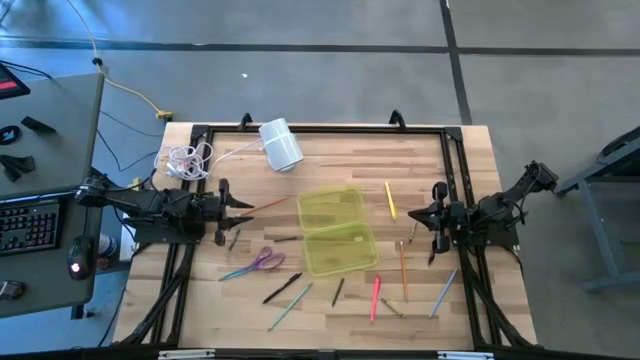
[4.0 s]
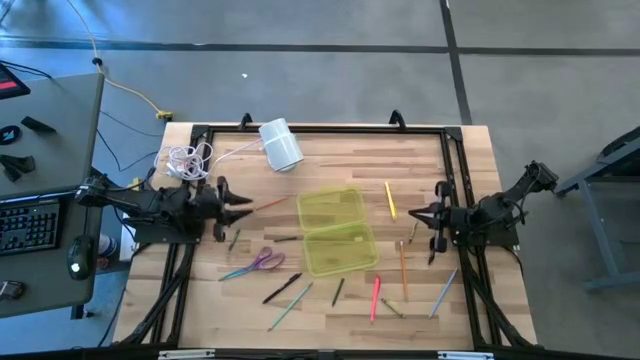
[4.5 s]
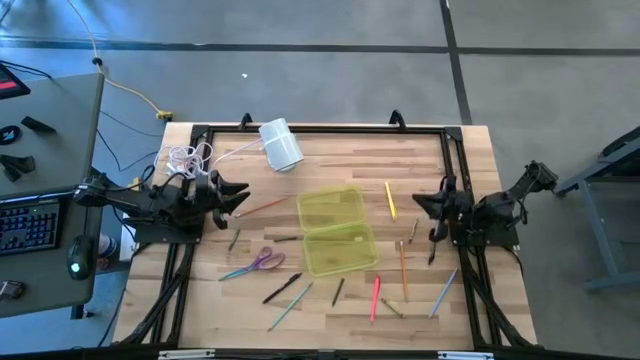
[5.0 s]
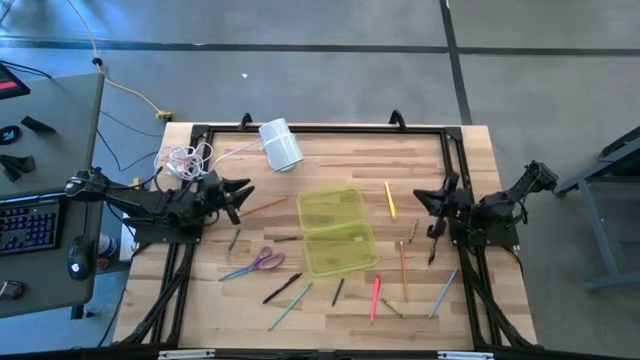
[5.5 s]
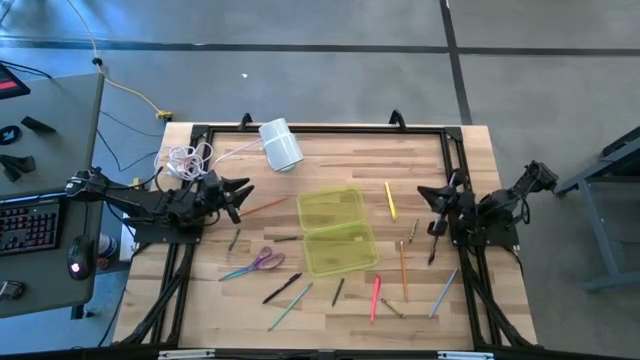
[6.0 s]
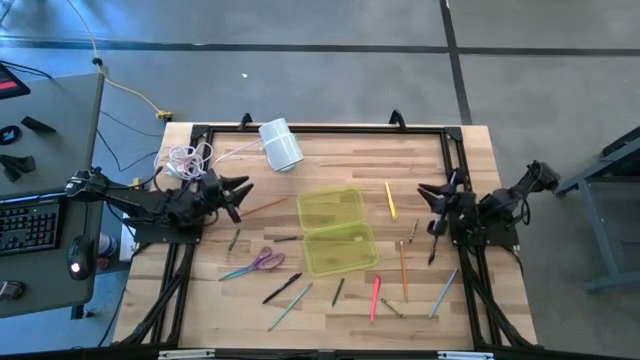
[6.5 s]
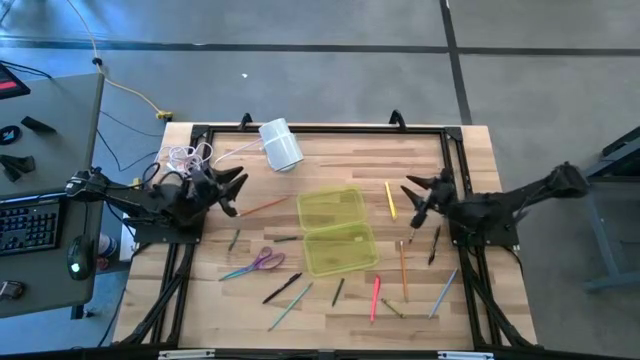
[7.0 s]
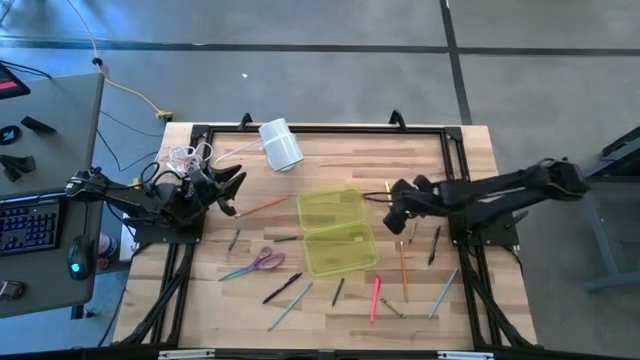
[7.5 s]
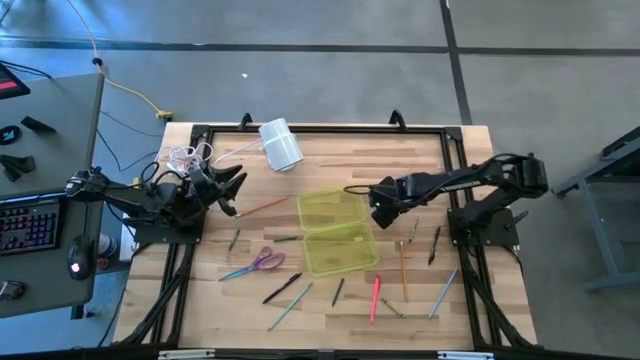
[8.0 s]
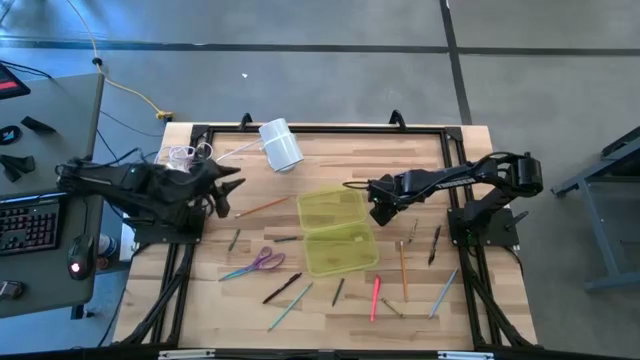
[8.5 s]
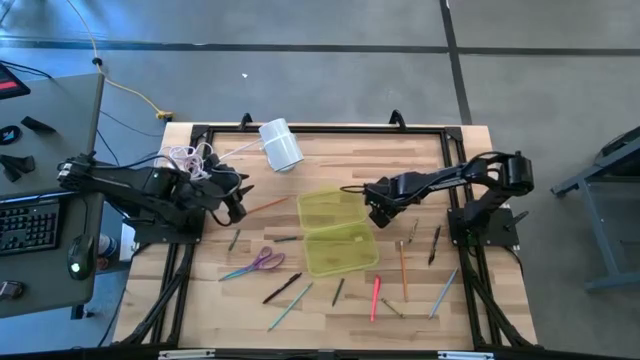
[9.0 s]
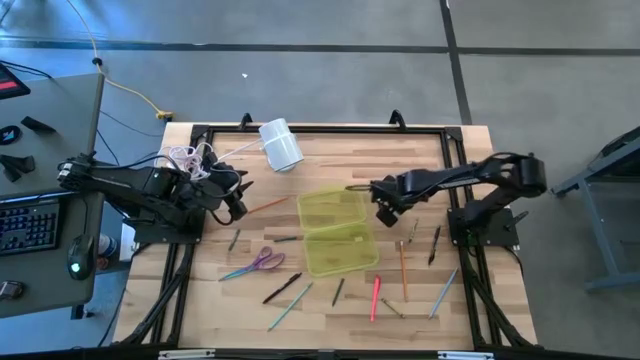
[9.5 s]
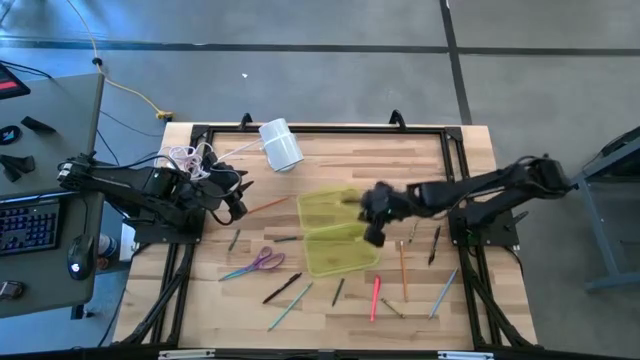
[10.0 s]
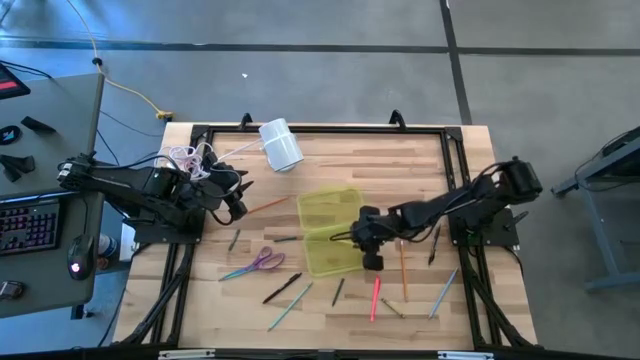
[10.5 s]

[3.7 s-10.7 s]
Task: Pick & place school supplies into a supply box
Put the yellow pen into the supply box

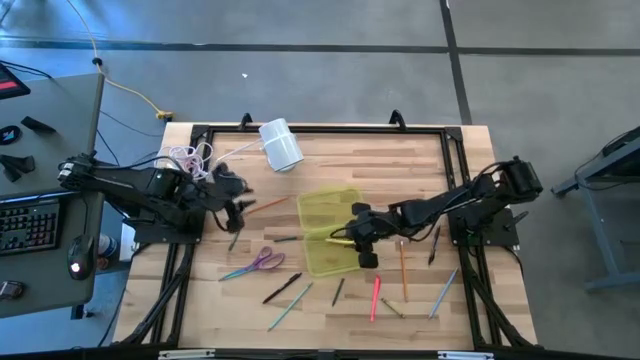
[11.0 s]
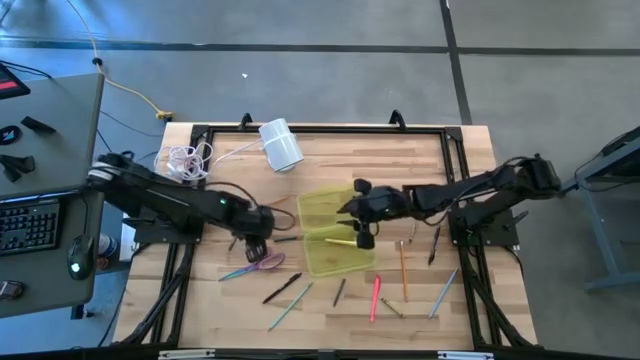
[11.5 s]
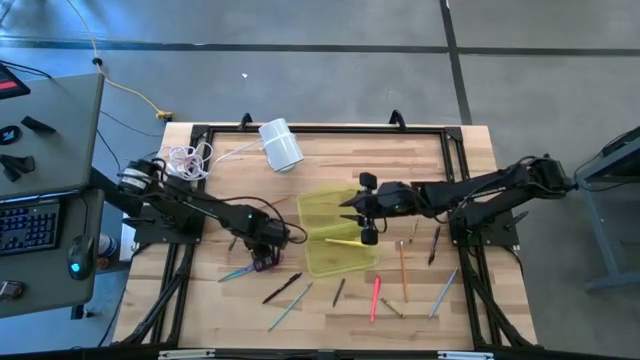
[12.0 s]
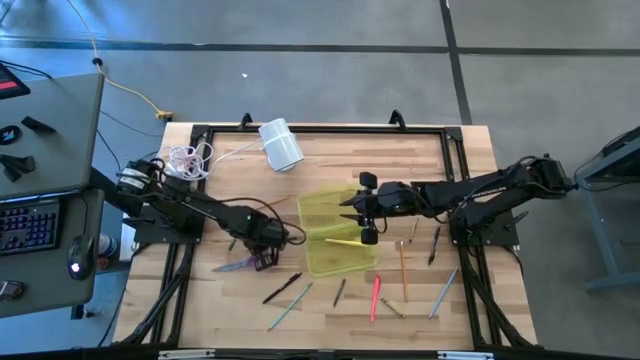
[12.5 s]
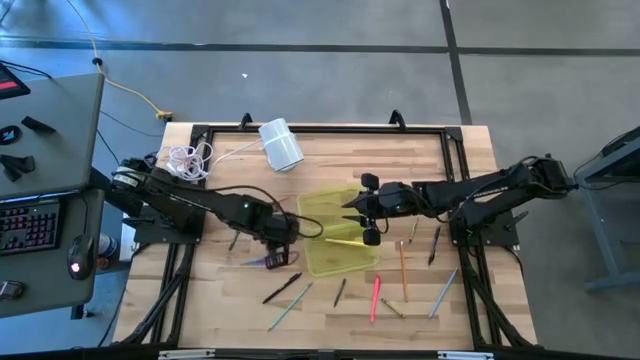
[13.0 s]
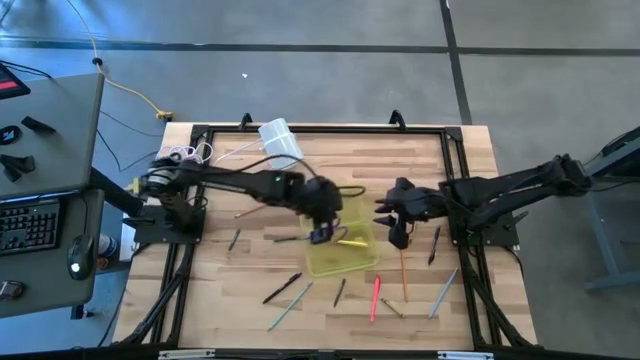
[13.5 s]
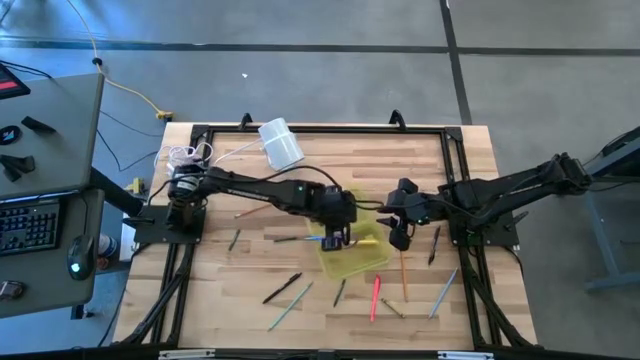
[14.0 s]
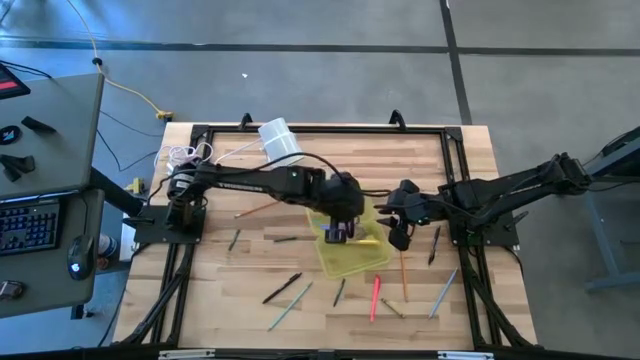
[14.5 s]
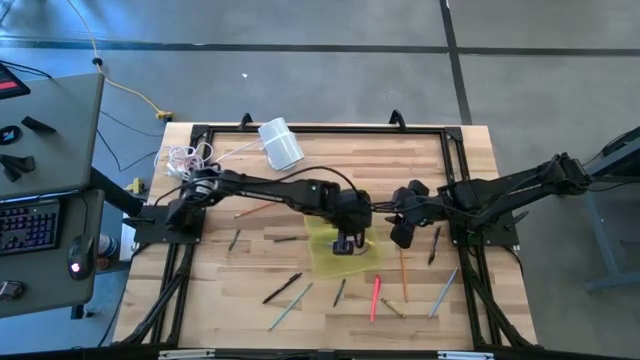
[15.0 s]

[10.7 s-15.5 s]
Put the purple scissors into the supply box

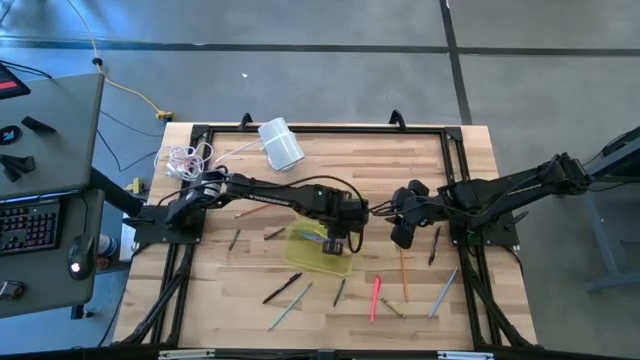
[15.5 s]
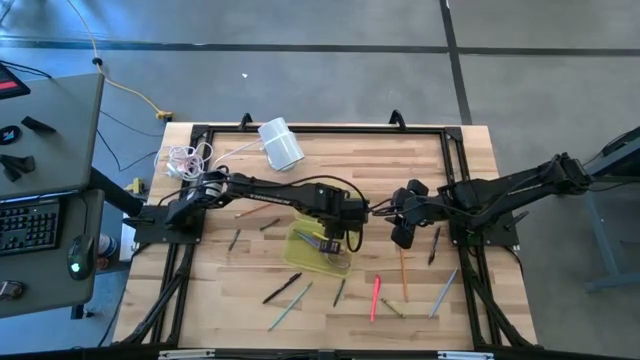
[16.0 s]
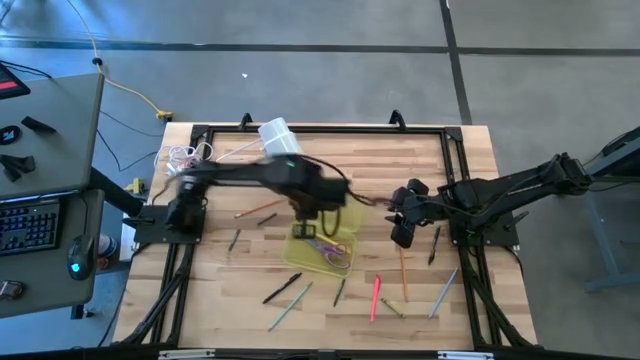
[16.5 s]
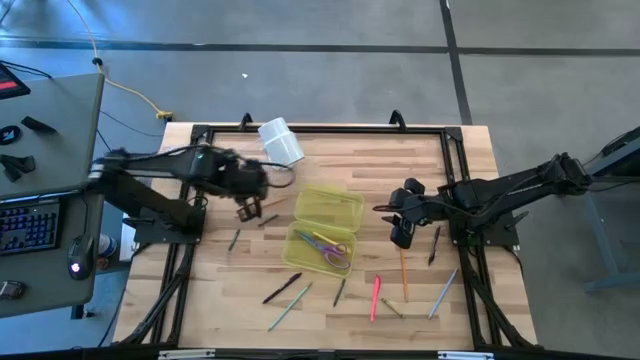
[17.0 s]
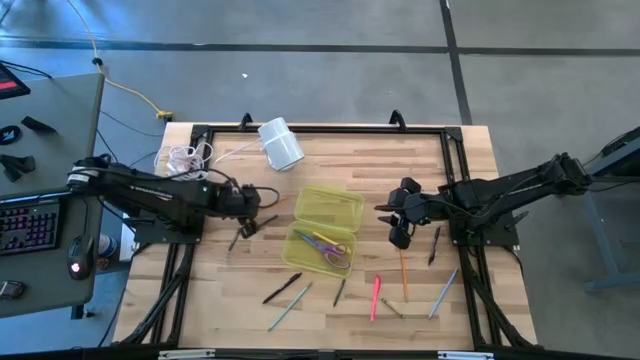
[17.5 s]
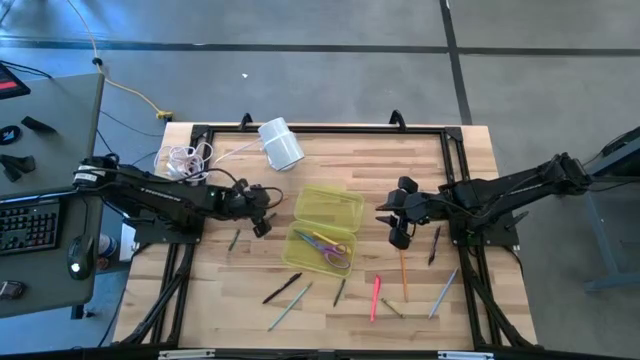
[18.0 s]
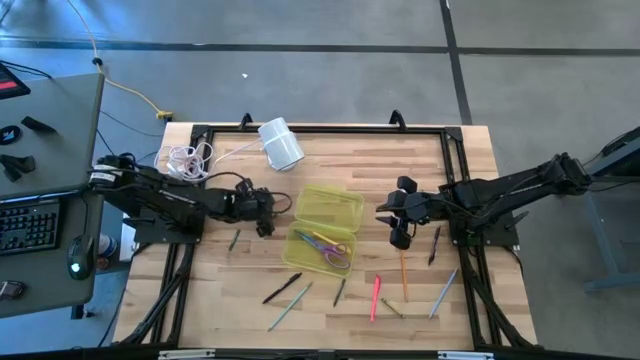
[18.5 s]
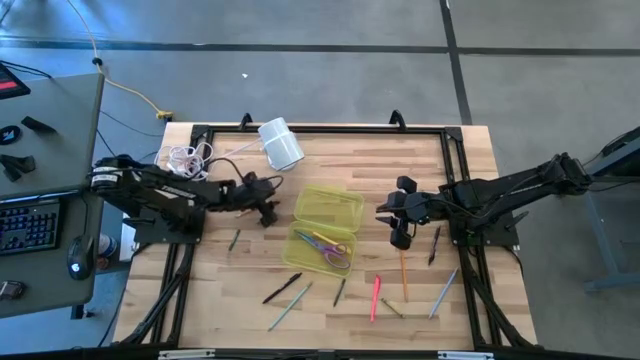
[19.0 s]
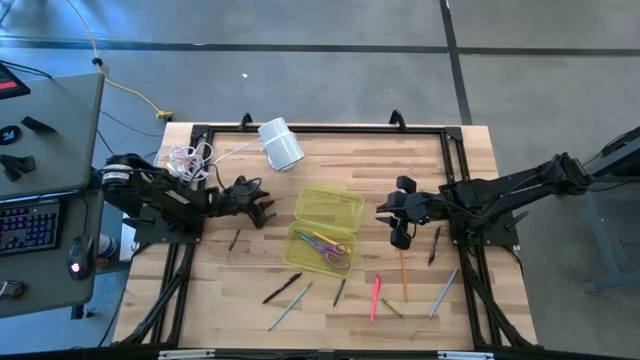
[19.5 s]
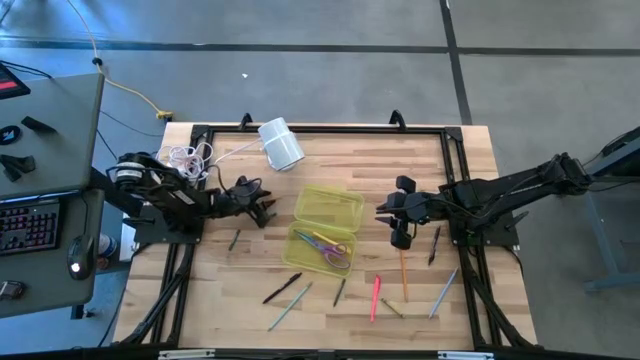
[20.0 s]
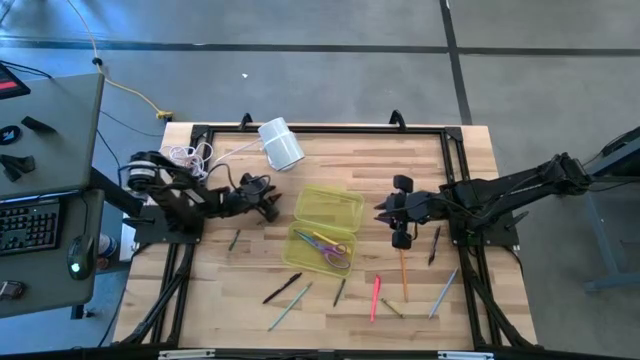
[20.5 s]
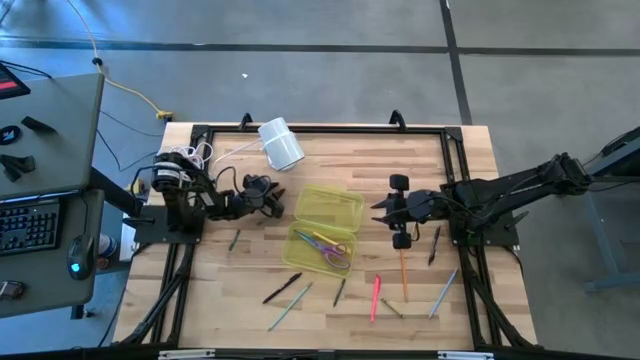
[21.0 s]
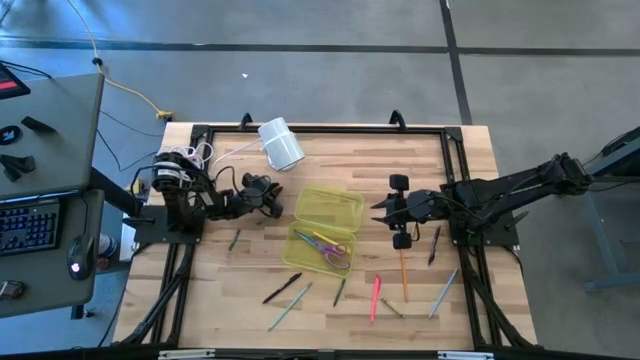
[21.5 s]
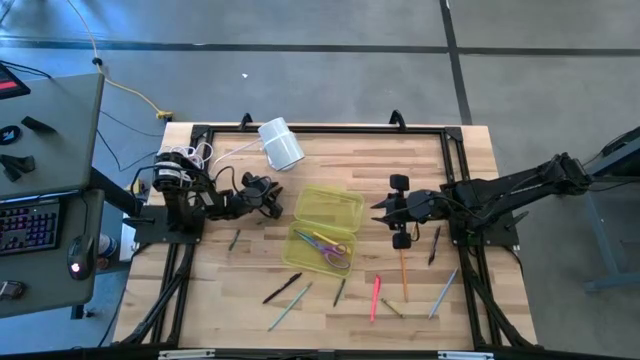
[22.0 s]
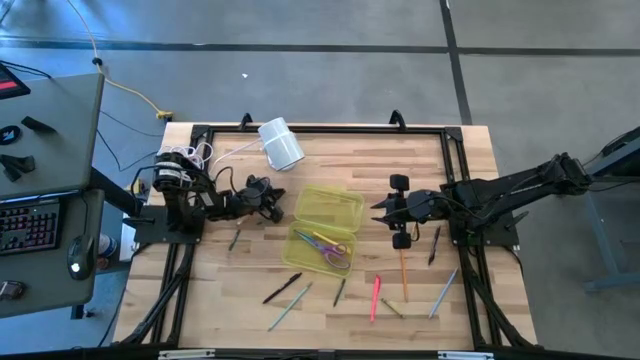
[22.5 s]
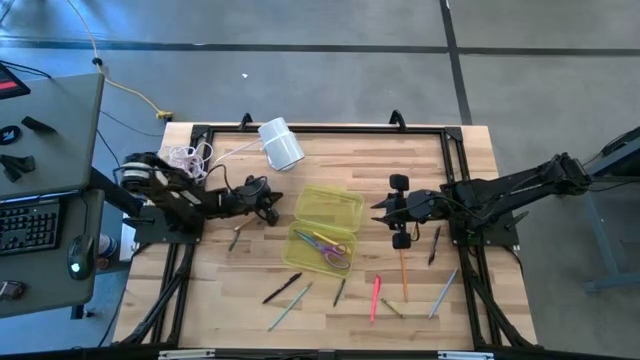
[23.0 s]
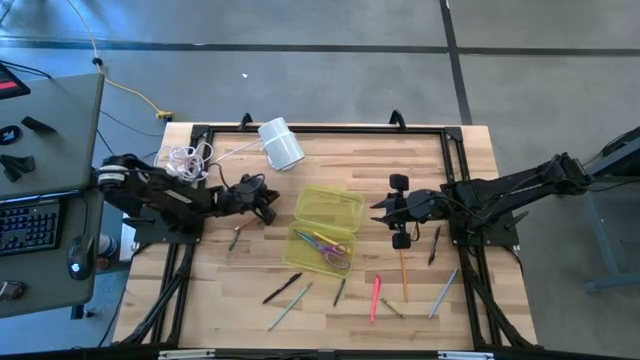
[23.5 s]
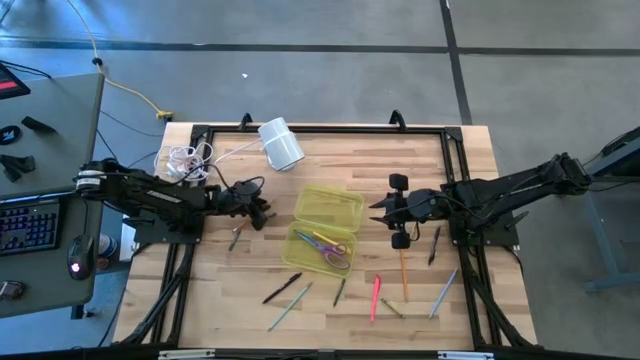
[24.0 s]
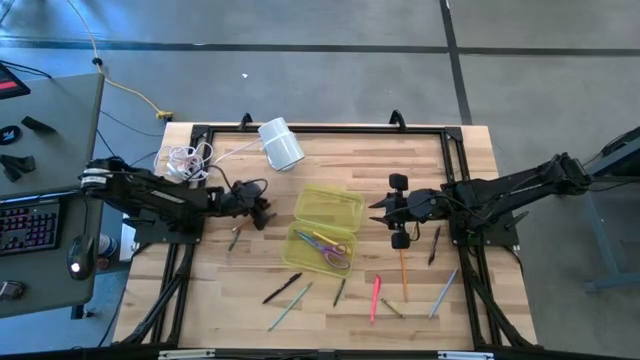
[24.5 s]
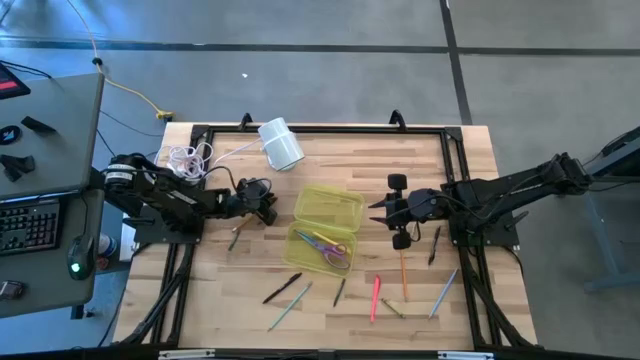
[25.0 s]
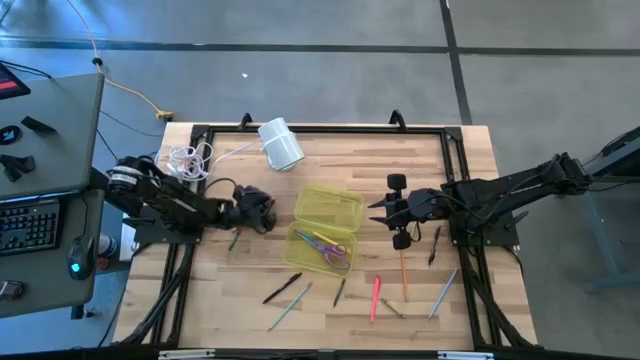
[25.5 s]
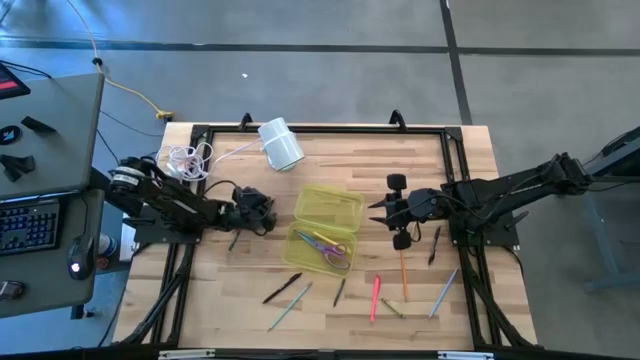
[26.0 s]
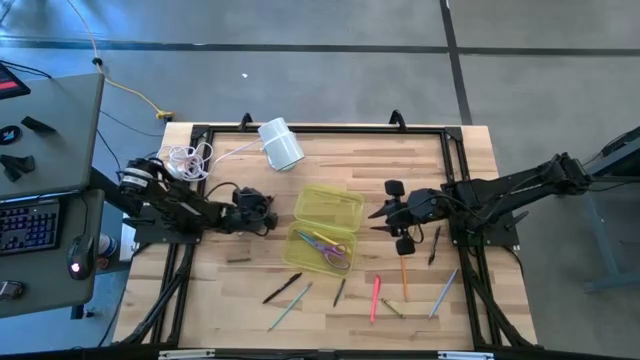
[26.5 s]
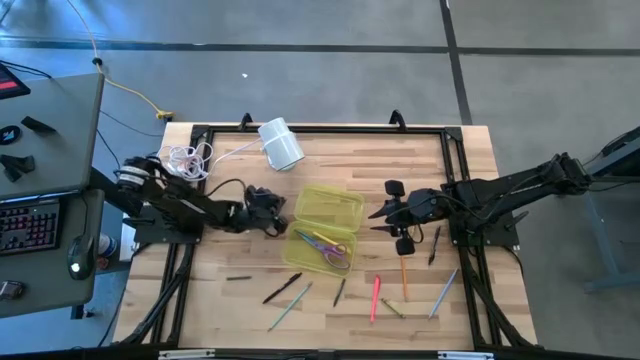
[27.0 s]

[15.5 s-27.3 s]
Put the top orange pencil into the supply box
